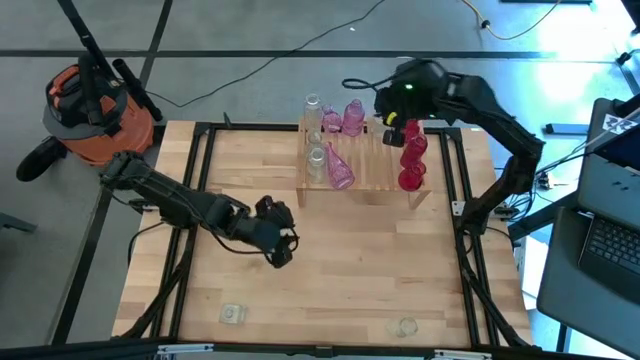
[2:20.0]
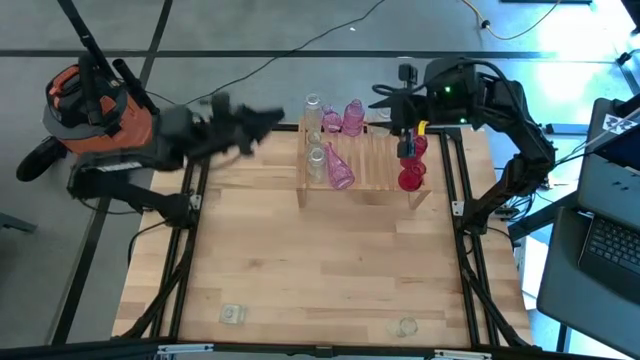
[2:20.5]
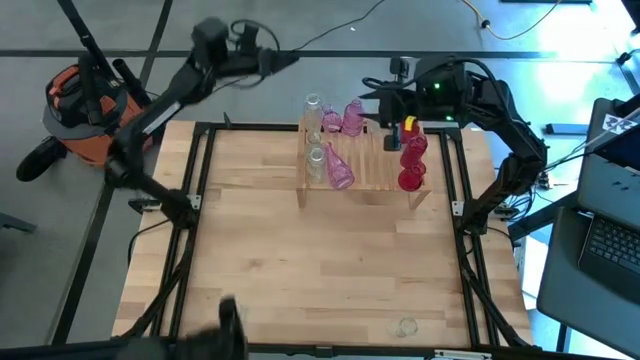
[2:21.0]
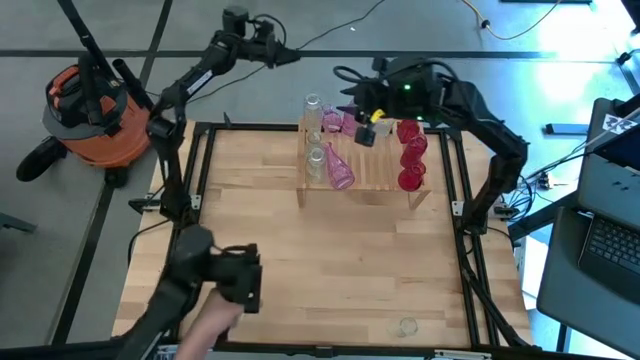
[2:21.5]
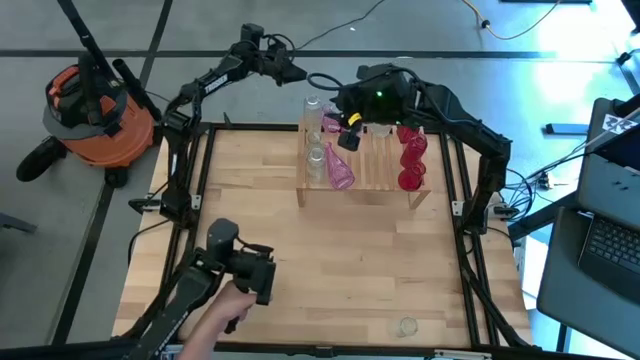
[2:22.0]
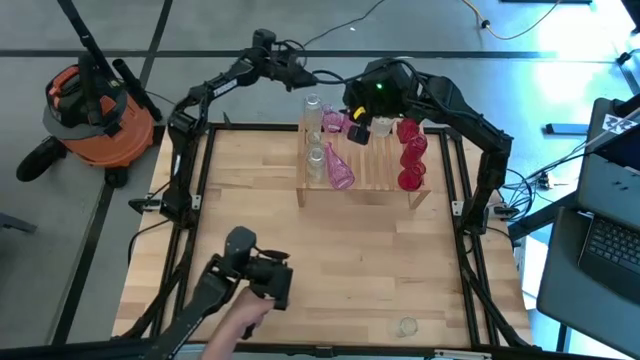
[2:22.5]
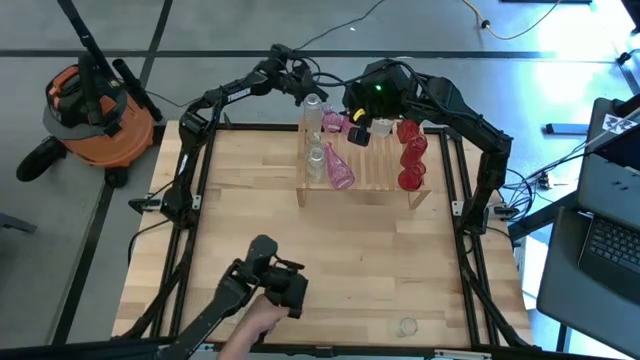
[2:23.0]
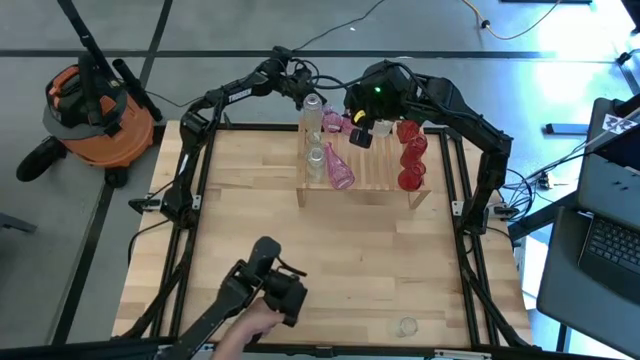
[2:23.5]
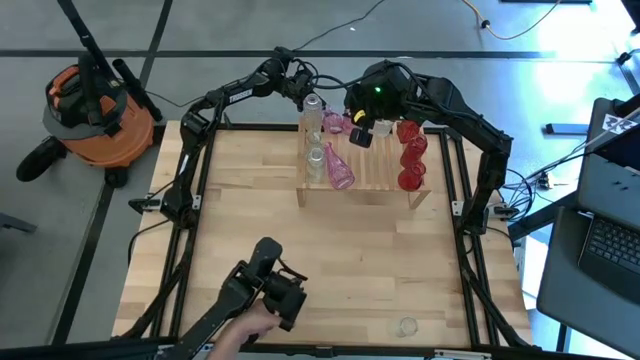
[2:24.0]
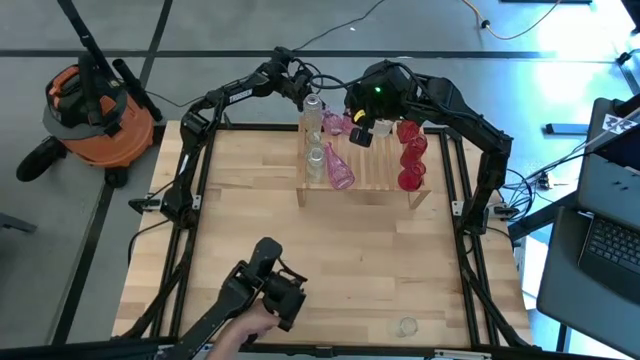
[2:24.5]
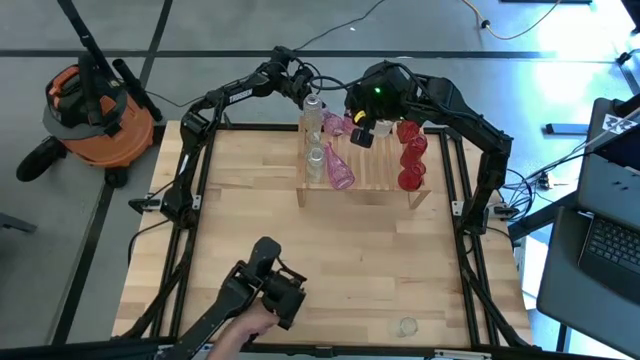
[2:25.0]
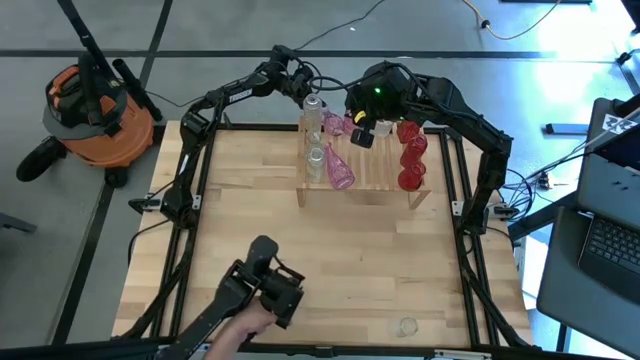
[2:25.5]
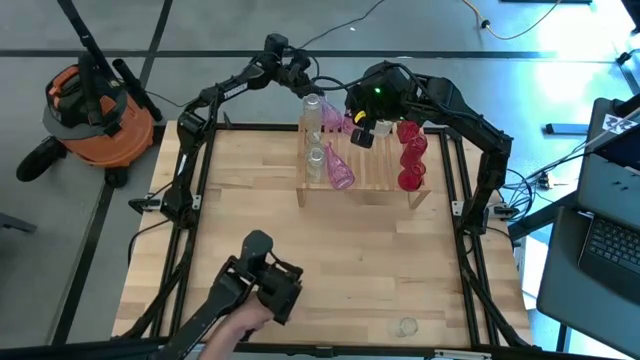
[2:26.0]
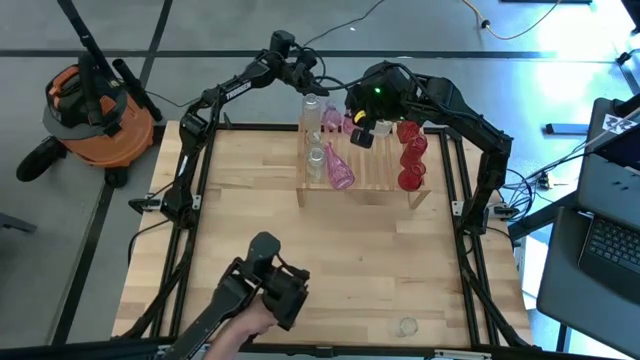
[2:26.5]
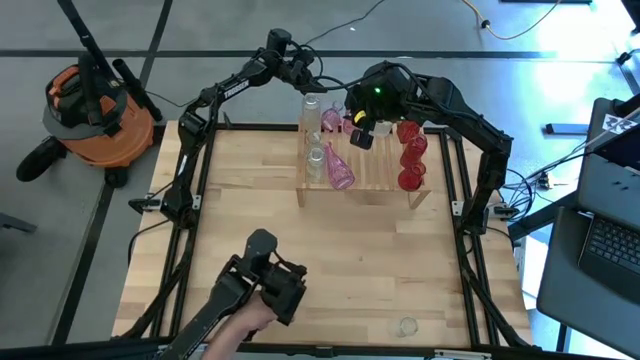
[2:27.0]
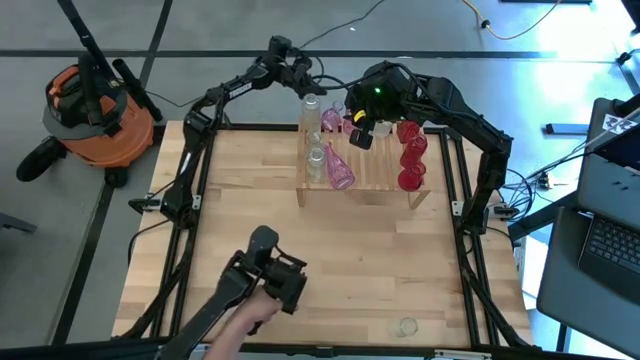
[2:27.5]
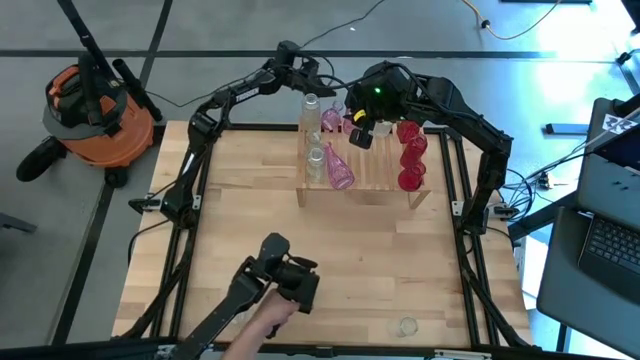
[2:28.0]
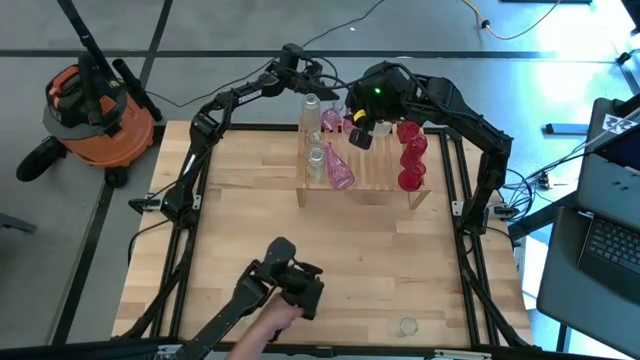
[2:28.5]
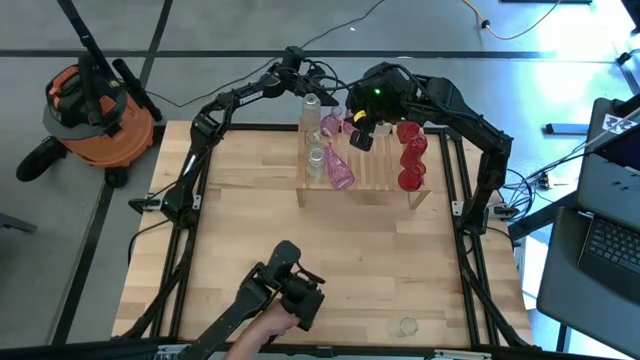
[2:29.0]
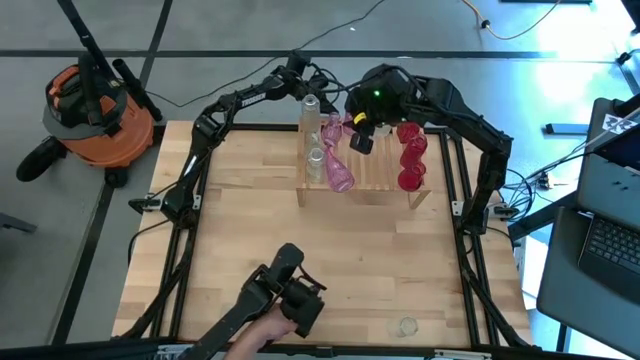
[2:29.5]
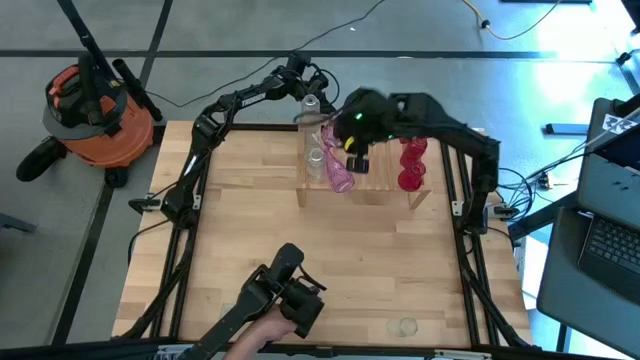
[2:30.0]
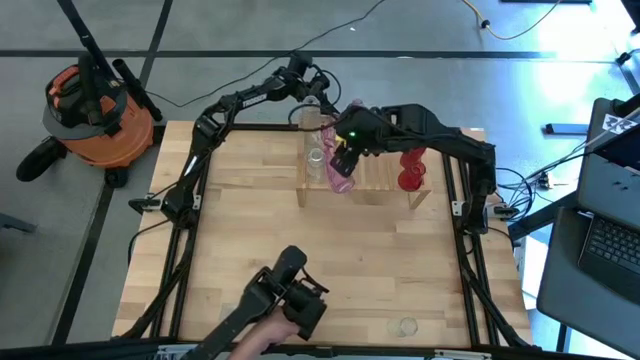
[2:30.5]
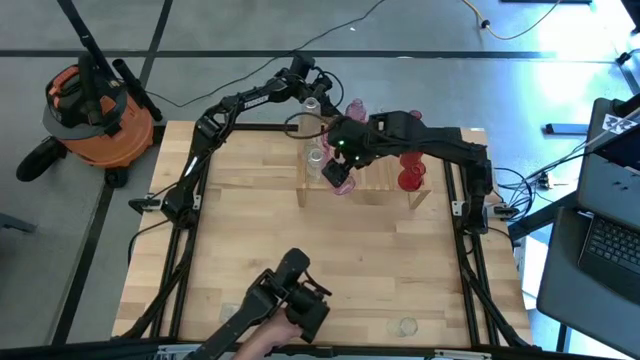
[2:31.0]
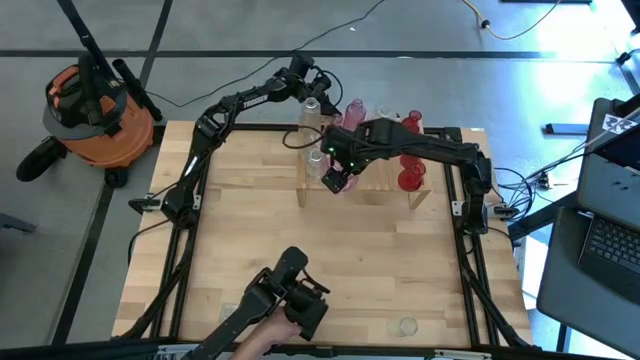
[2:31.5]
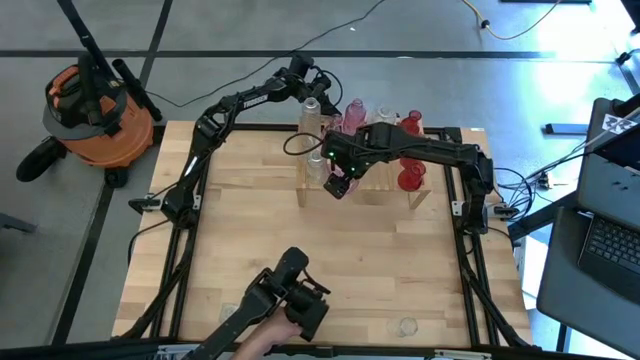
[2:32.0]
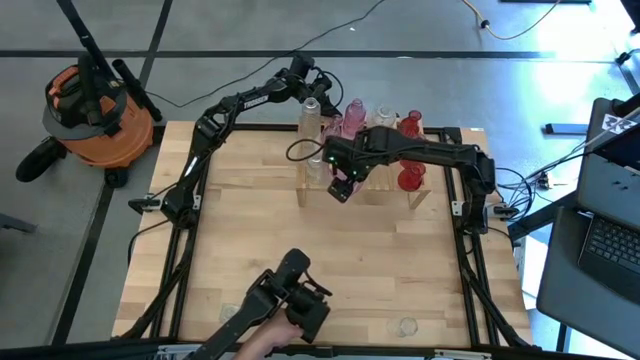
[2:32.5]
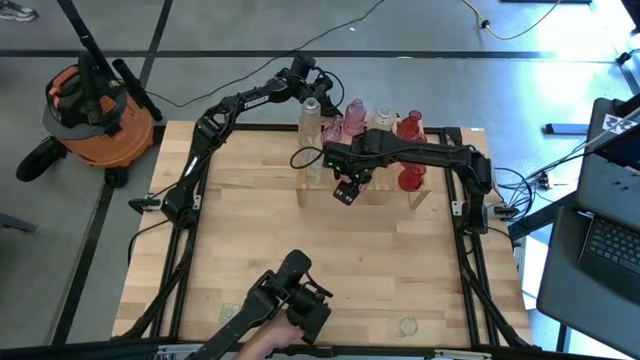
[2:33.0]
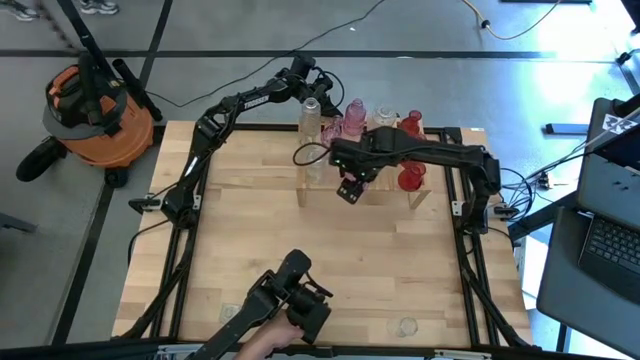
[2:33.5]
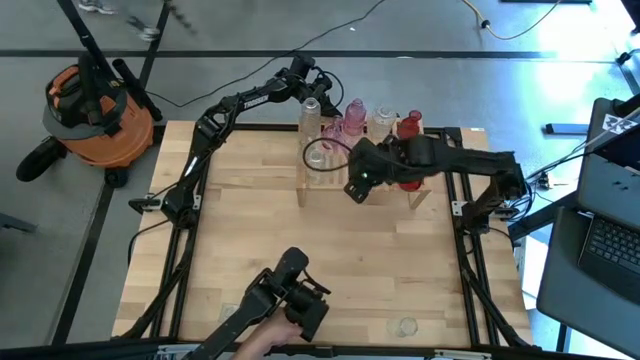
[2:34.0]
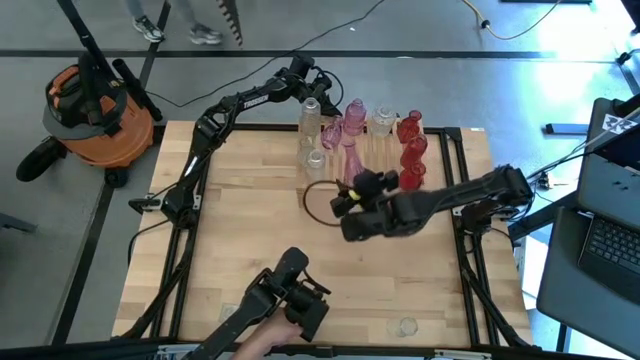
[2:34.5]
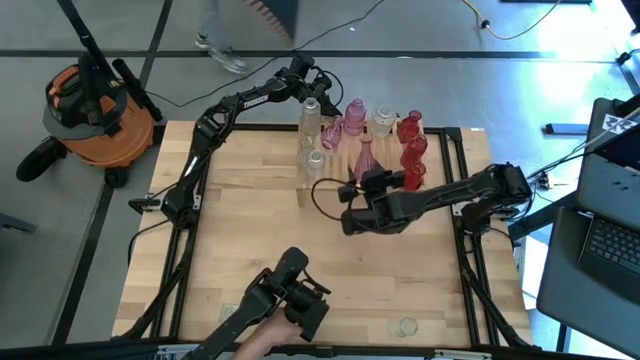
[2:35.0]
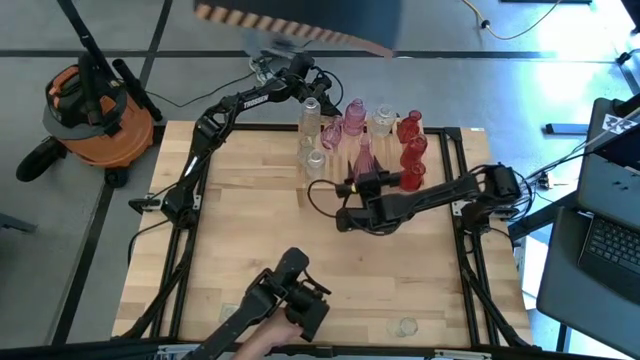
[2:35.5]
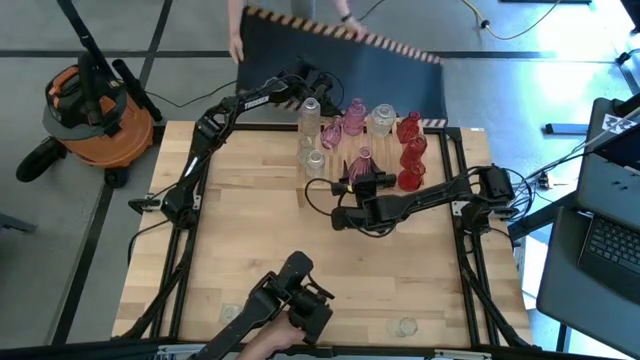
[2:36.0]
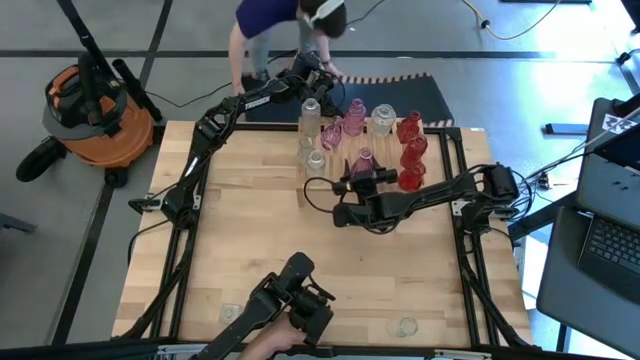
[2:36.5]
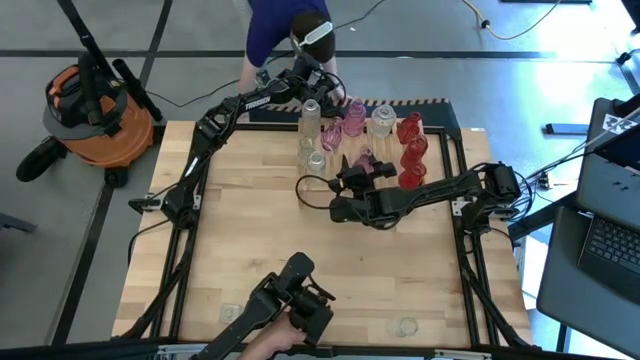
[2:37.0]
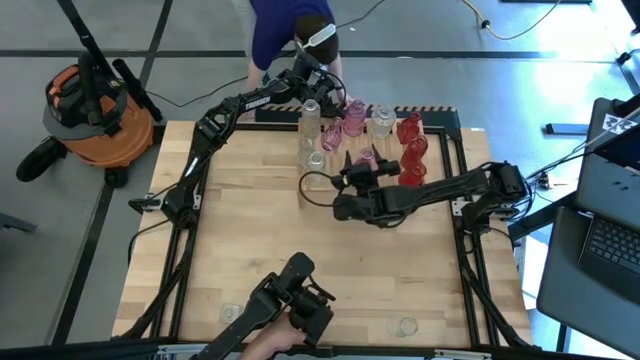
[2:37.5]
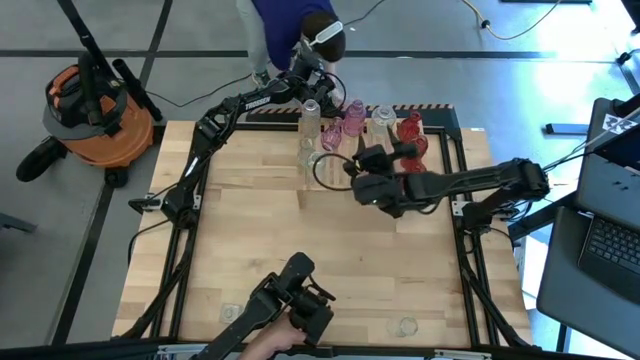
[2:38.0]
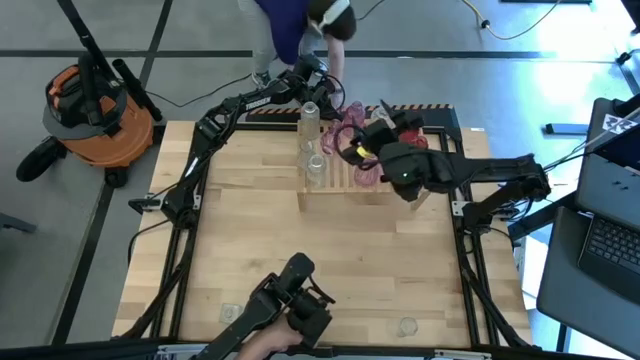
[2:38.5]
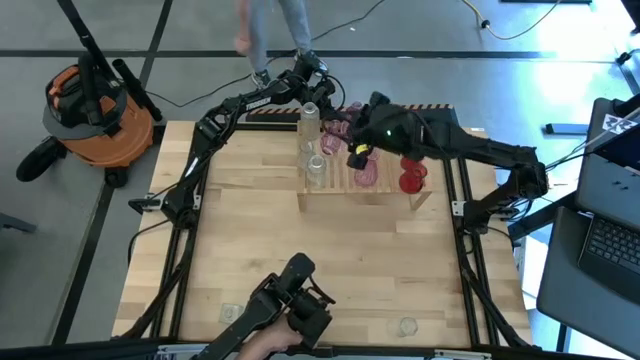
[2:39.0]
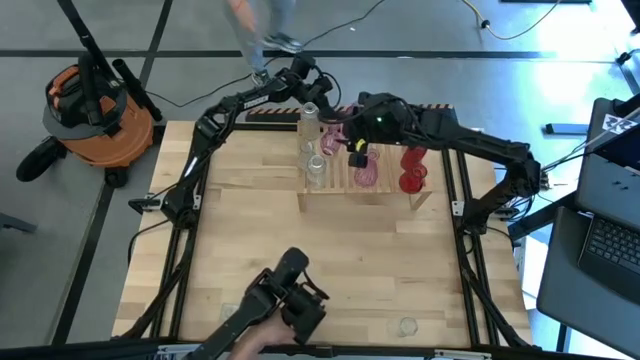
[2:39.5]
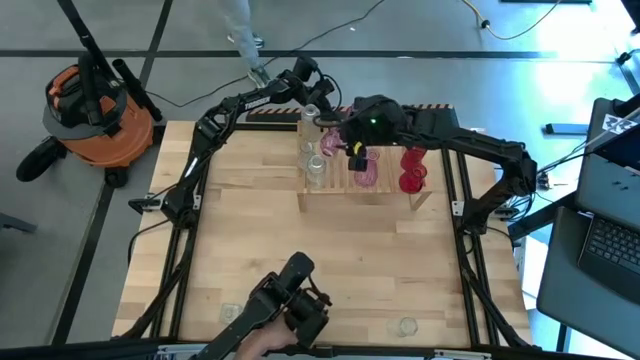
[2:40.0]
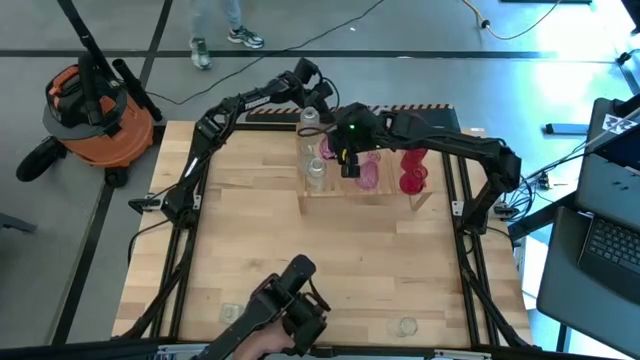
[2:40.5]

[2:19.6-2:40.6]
Task: sort vases onto shelf
Adjust the pink vase on the shelf
